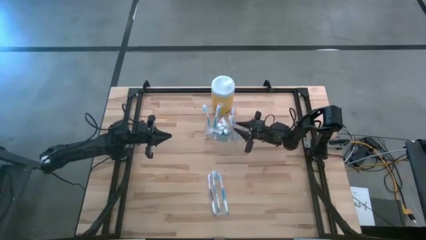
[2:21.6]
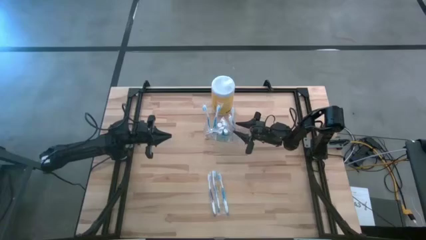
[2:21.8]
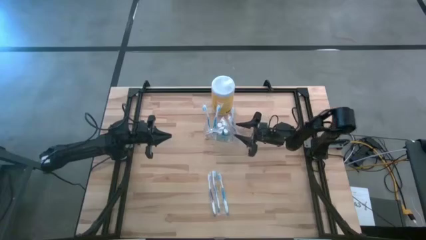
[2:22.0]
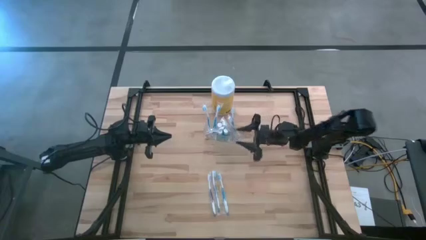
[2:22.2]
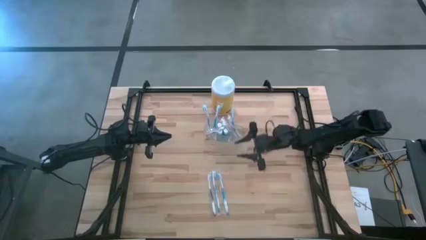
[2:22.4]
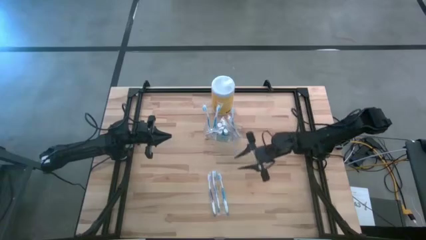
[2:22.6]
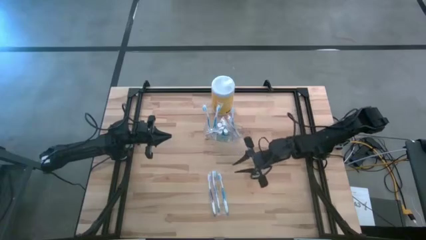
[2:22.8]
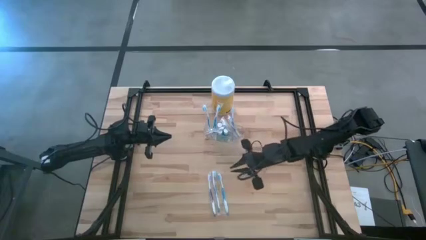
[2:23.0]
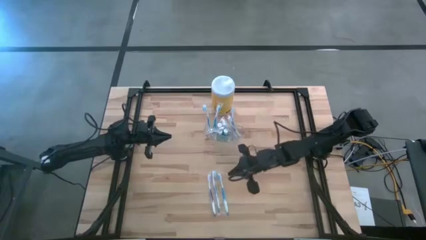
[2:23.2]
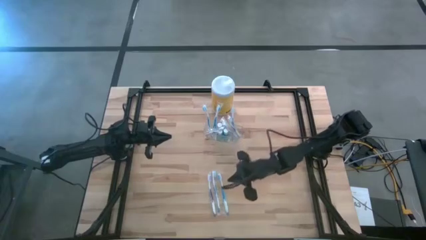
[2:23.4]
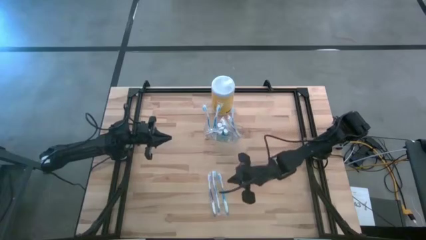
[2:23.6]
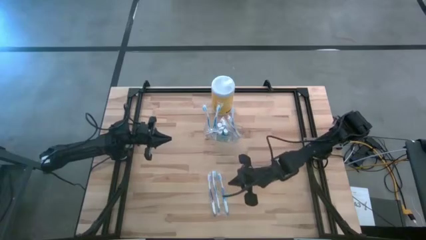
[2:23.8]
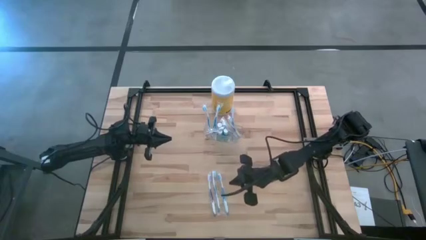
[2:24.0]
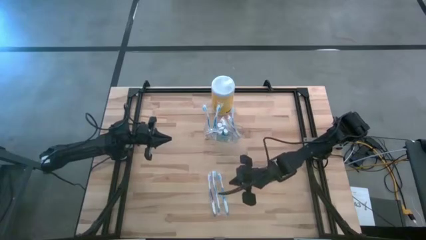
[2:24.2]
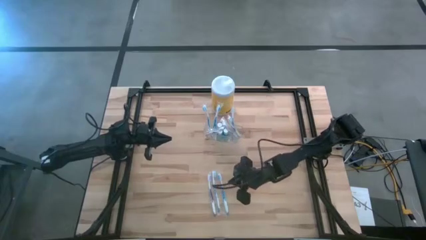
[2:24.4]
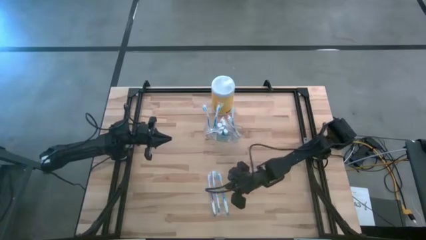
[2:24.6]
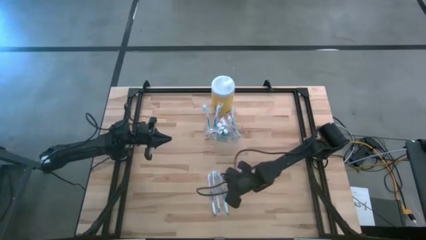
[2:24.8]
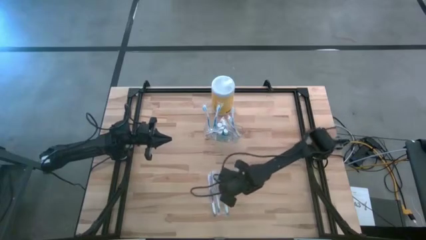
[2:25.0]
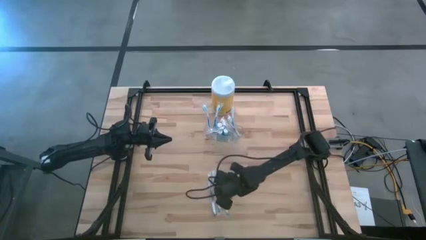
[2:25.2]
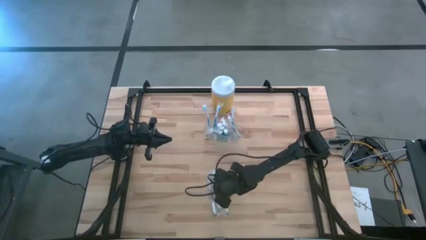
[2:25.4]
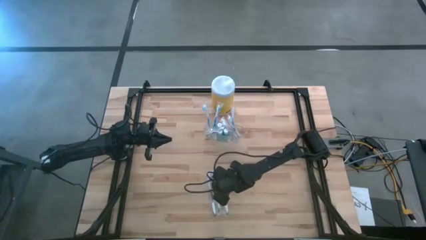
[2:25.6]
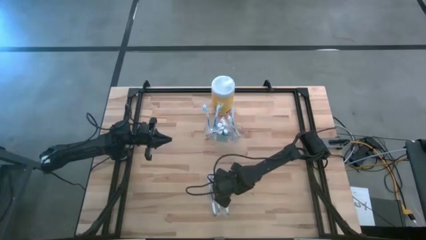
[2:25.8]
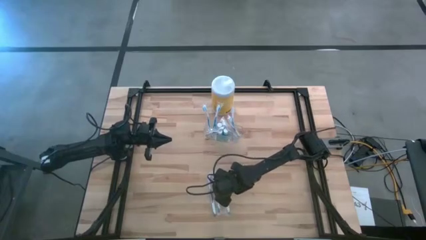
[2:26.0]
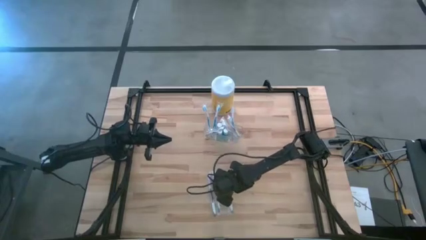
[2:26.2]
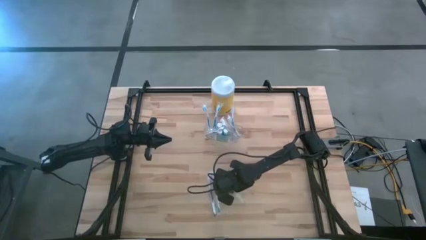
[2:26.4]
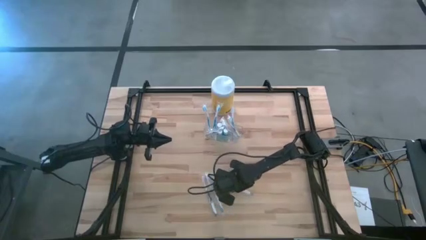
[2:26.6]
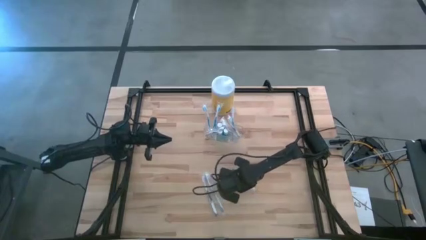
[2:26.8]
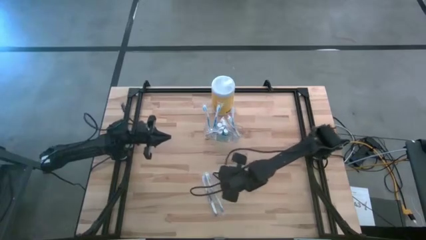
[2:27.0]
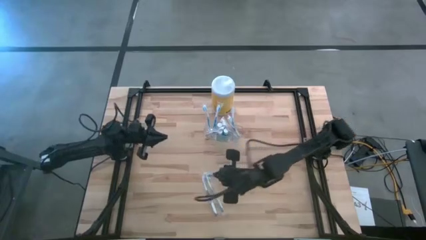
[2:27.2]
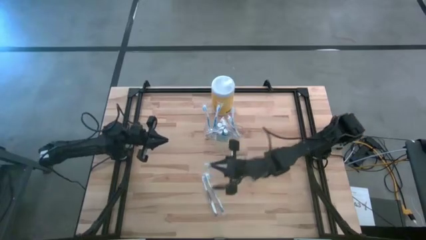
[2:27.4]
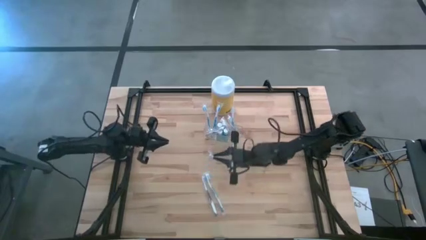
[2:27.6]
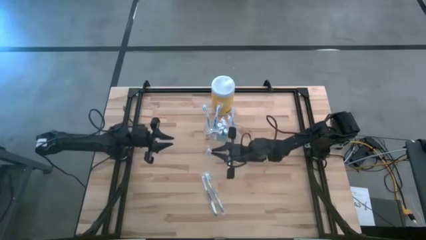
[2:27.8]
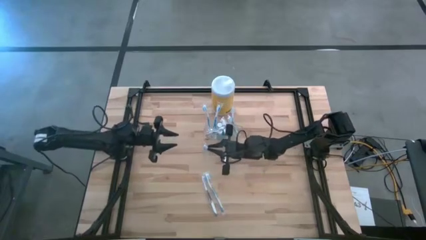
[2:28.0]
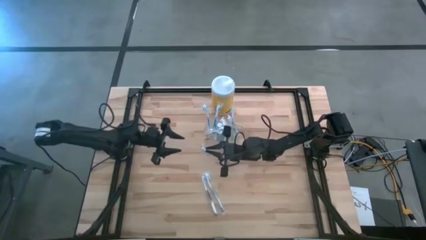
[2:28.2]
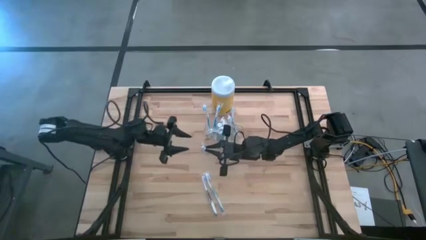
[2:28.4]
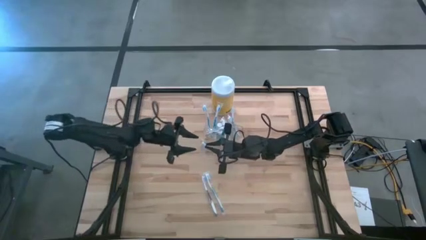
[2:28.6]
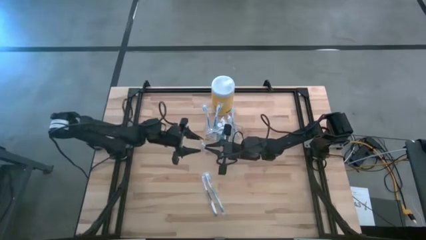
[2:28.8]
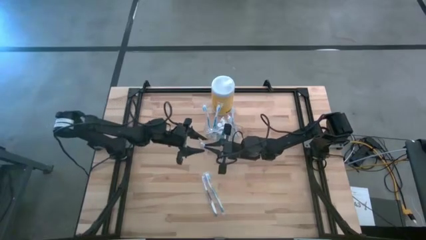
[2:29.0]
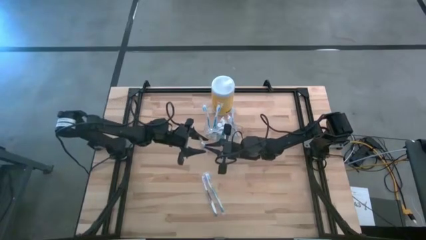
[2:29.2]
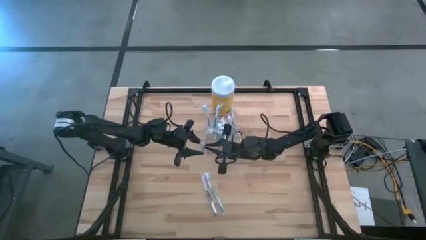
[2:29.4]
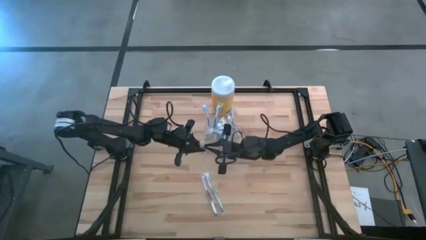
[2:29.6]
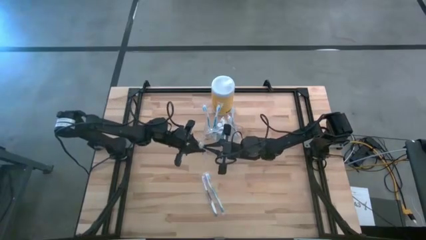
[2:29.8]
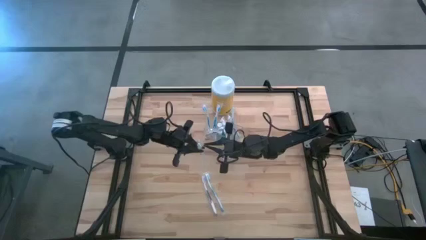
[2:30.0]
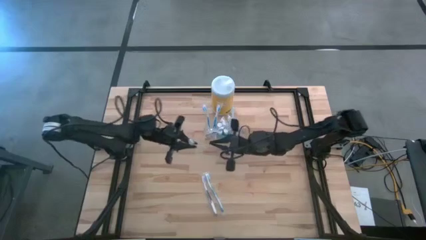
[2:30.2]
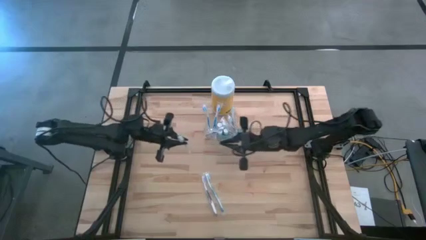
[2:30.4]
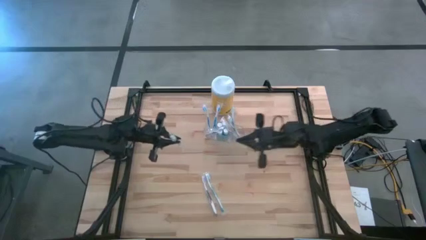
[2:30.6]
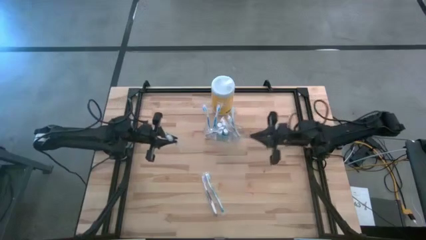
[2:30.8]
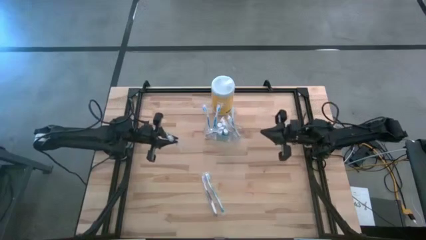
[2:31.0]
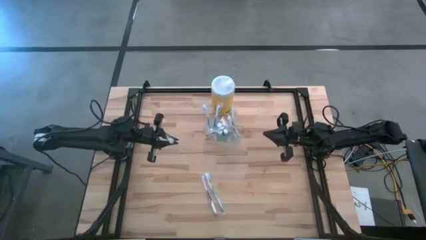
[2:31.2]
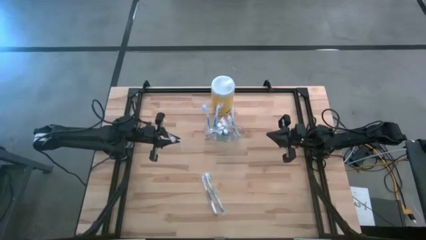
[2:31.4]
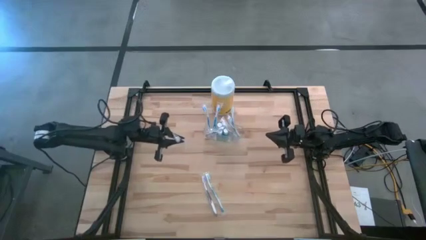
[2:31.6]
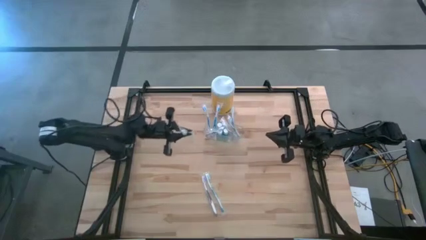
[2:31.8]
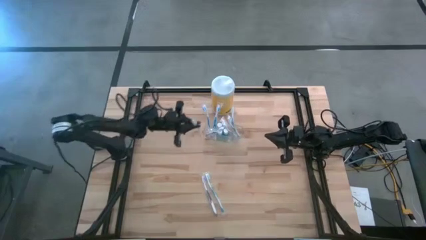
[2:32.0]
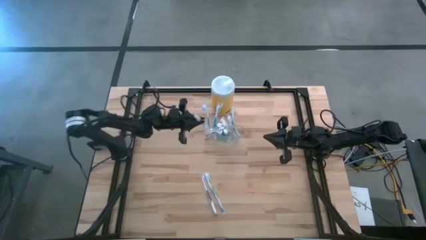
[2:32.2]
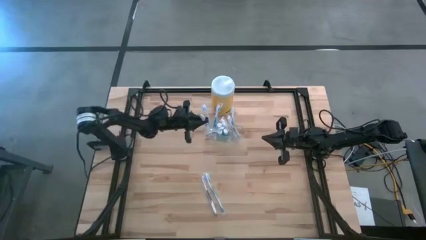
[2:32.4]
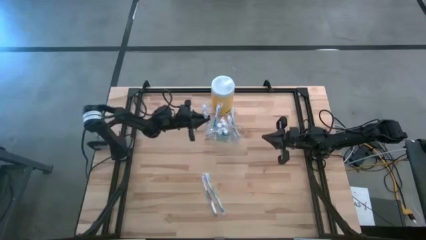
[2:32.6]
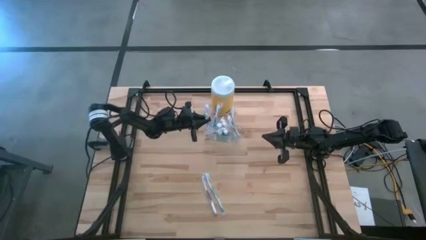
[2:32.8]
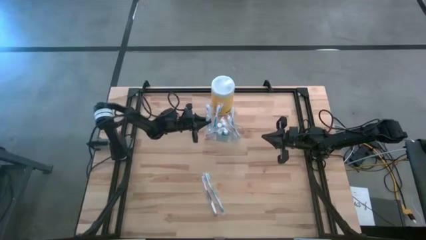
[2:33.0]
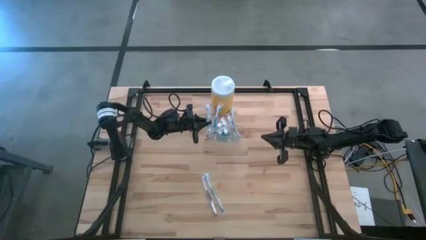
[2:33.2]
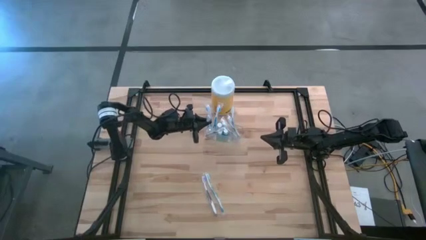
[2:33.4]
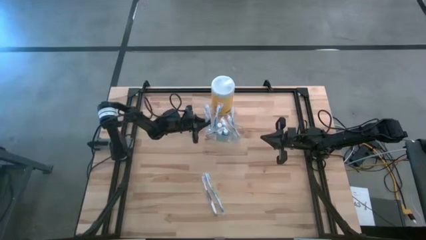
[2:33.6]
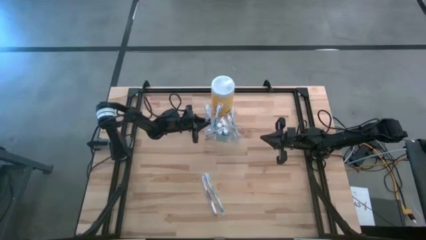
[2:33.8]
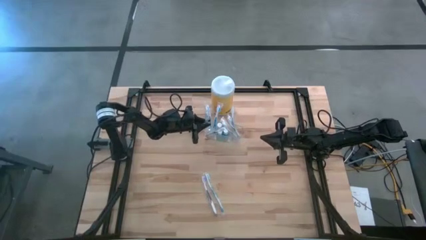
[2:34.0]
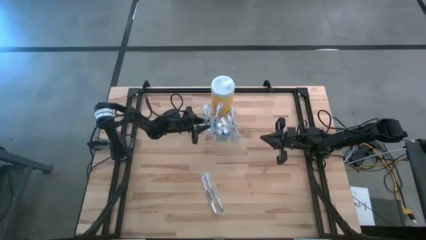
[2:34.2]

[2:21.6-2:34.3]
Task: Pick & Place toothbrushing station
Put the blue toothbrush into the transparent organizer

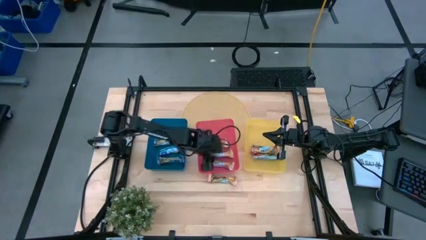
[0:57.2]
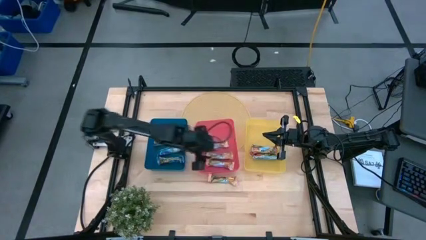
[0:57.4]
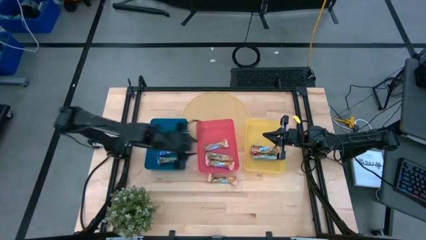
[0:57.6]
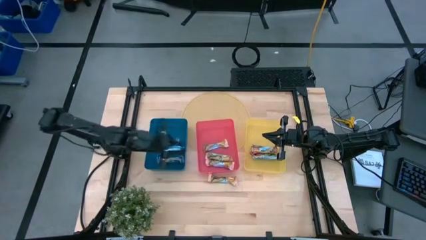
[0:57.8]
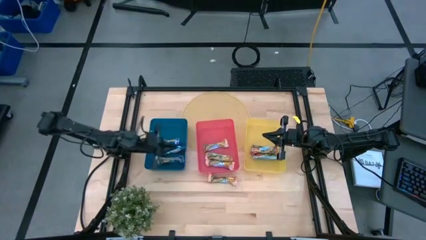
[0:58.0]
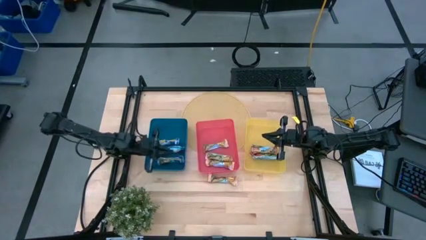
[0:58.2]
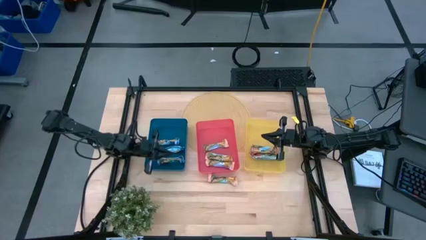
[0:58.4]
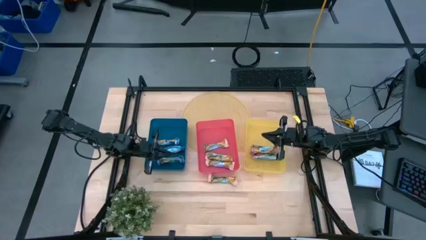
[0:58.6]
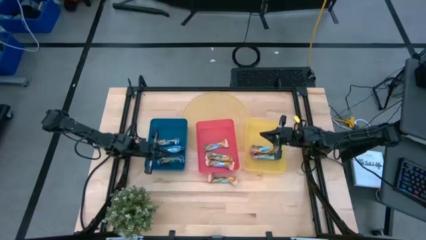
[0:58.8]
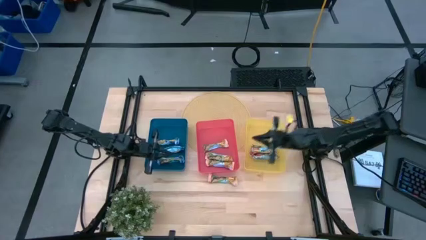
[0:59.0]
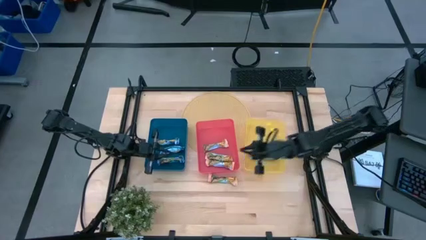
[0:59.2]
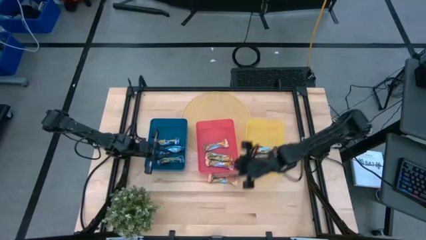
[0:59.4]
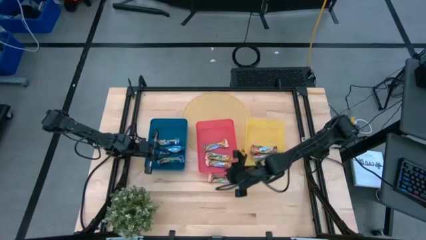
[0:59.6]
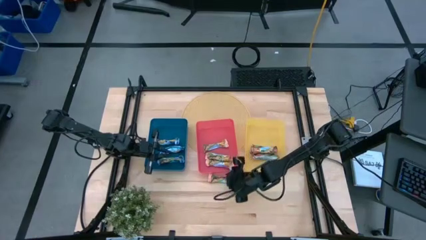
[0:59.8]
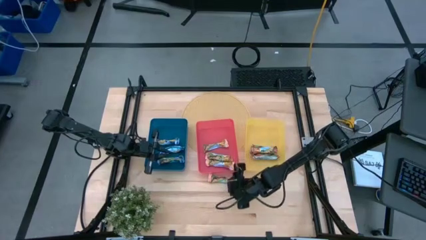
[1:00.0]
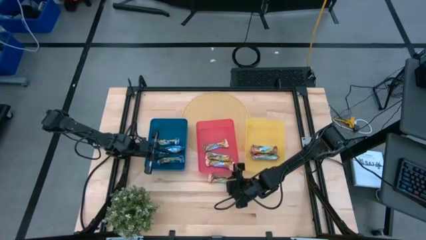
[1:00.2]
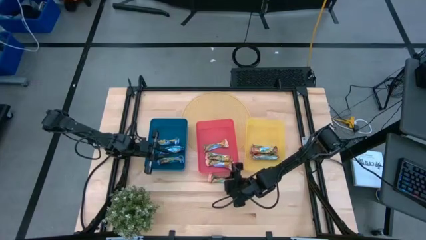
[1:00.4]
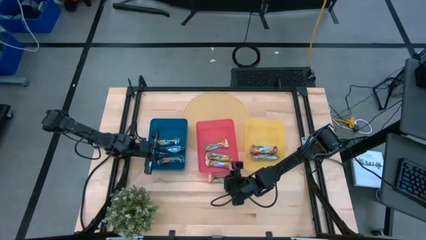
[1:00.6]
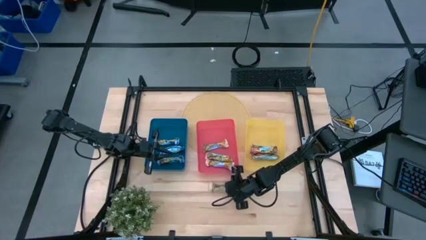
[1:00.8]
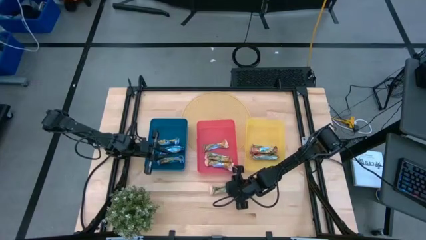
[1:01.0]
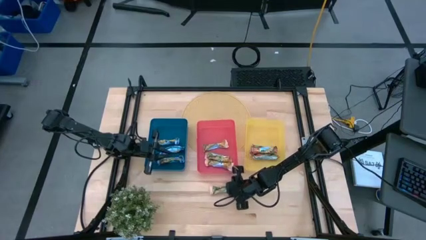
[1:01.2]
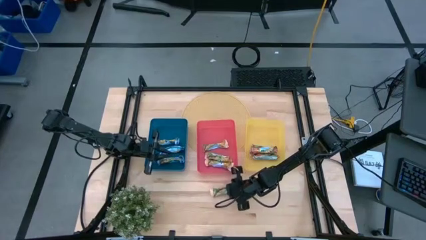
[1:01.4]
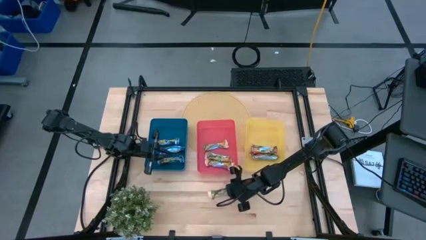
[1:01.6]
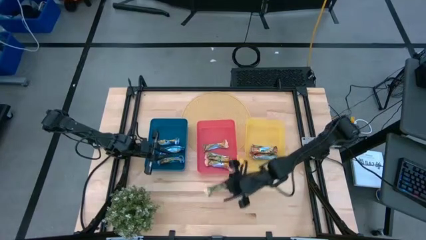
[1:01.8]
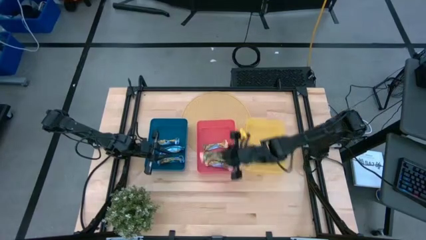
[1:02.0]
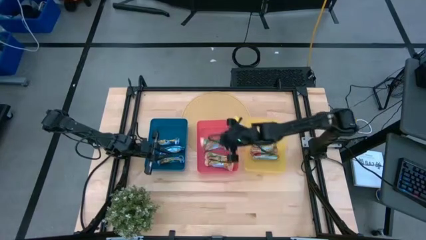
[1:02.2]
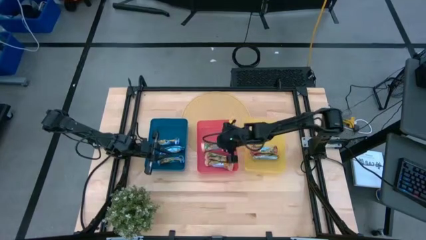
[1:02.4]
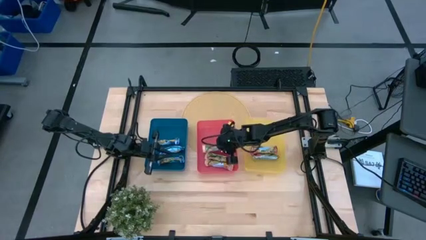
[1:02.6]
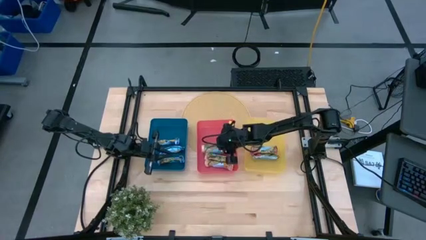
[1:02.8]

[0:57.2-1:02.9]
Task: Pick and place Granola Bars by type
Put the yellow granola bar into pink bin
